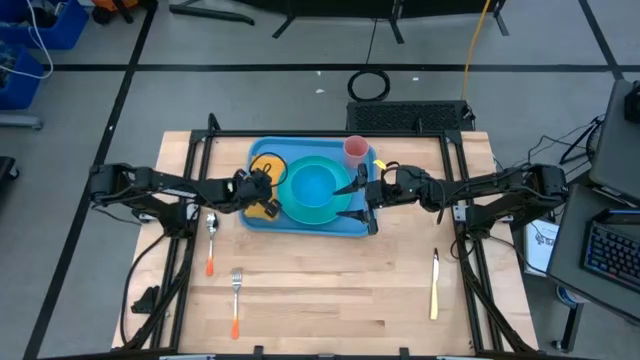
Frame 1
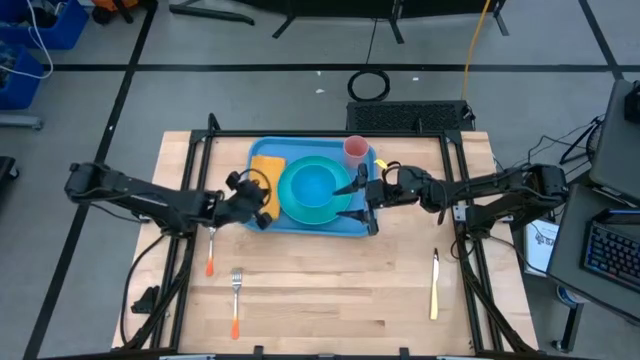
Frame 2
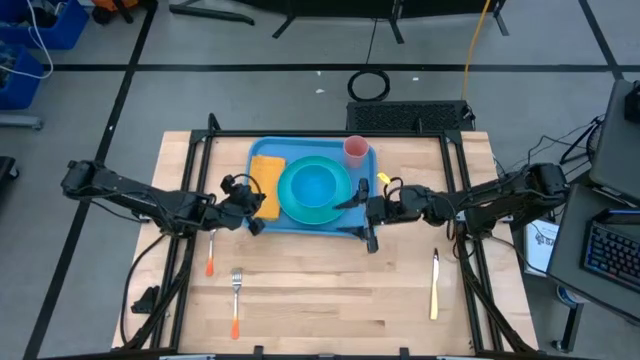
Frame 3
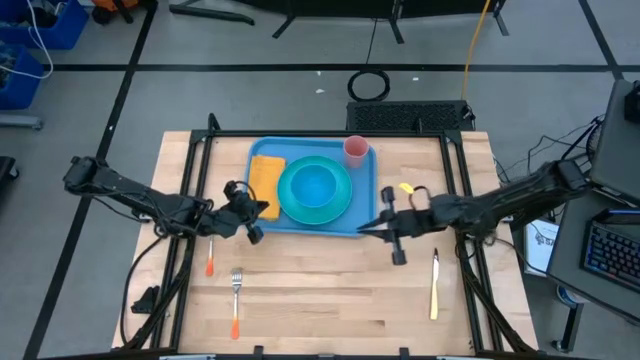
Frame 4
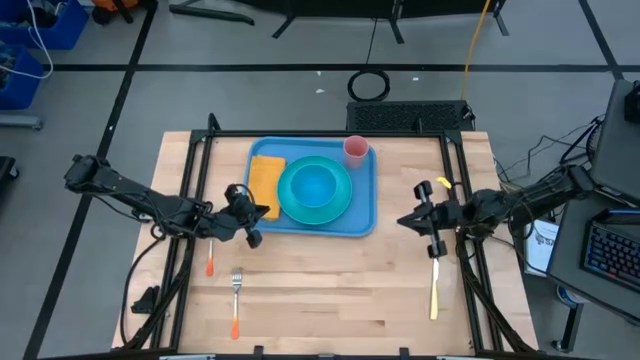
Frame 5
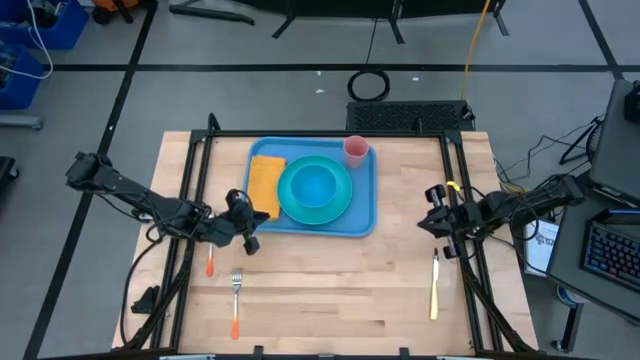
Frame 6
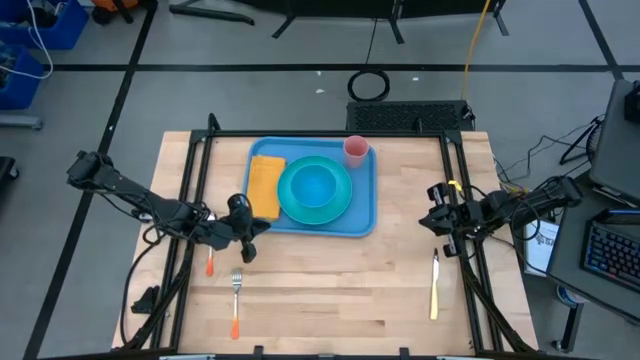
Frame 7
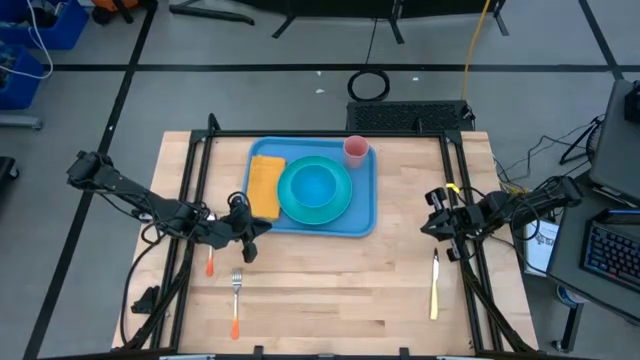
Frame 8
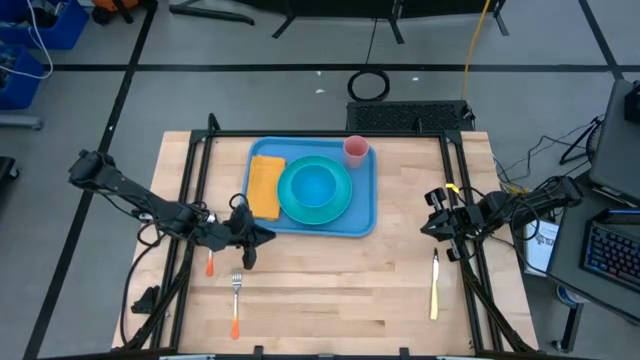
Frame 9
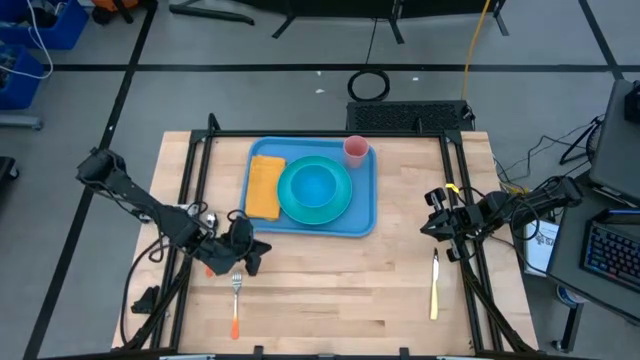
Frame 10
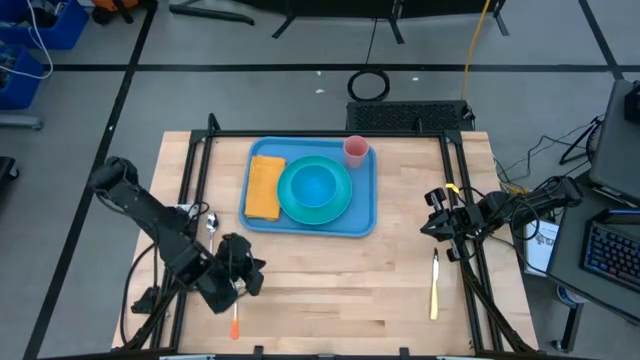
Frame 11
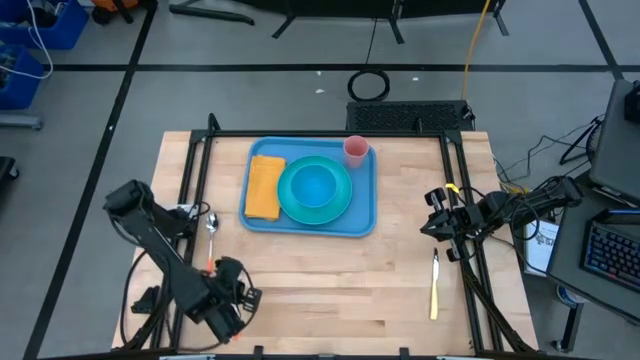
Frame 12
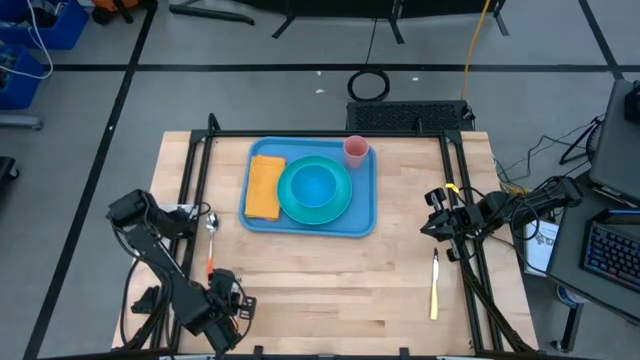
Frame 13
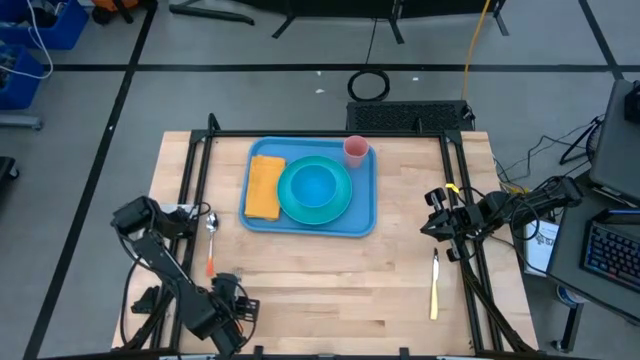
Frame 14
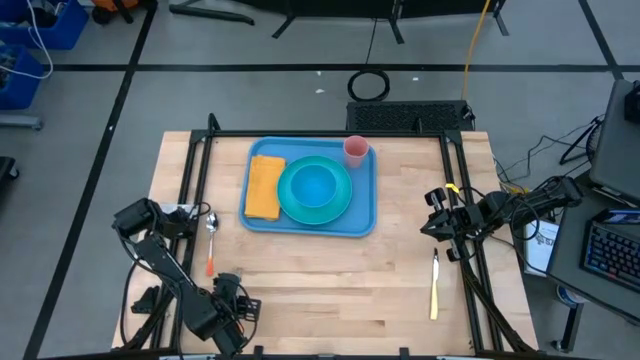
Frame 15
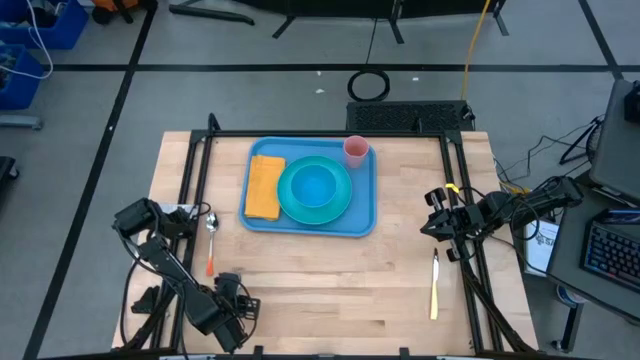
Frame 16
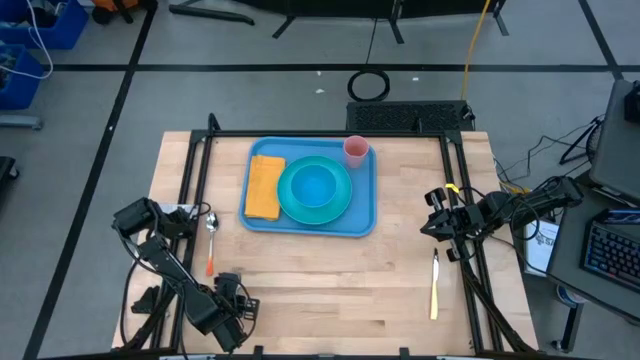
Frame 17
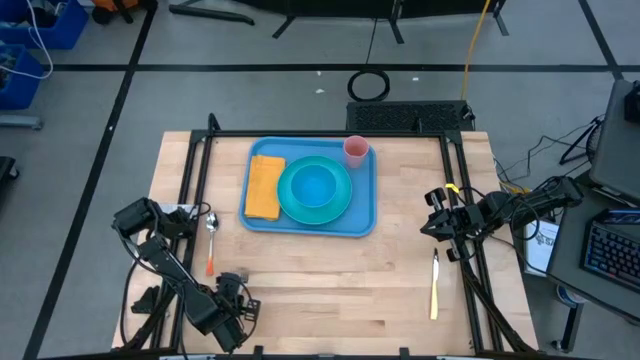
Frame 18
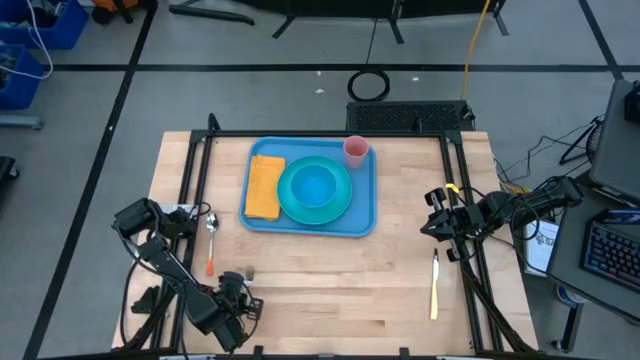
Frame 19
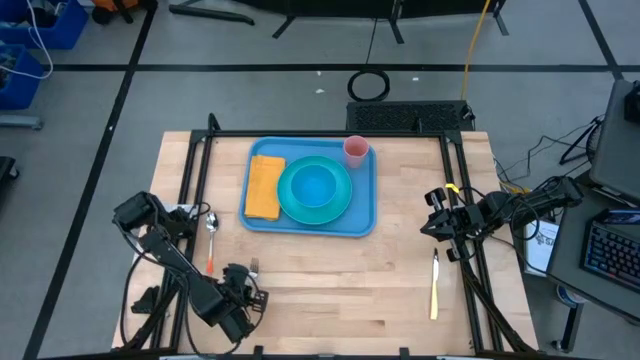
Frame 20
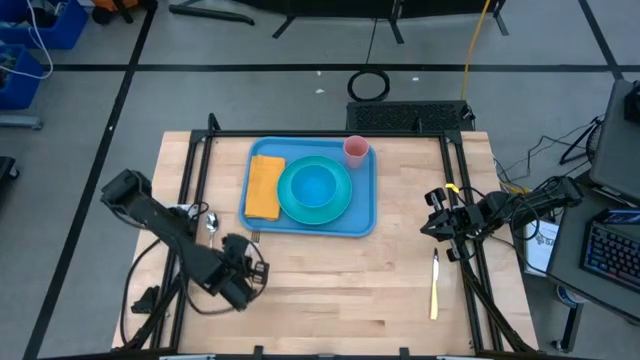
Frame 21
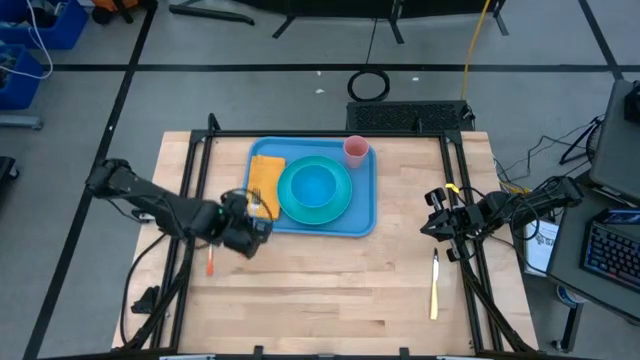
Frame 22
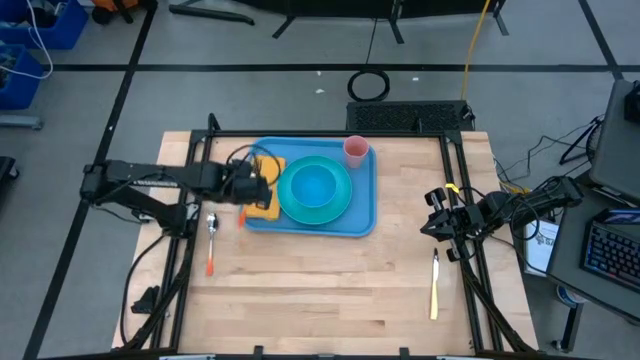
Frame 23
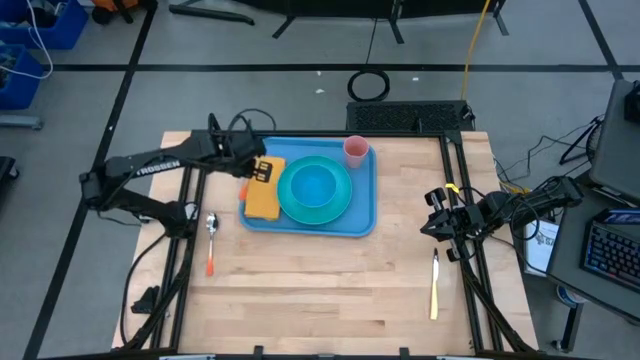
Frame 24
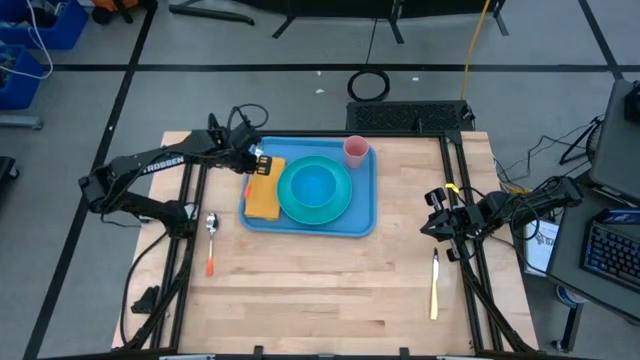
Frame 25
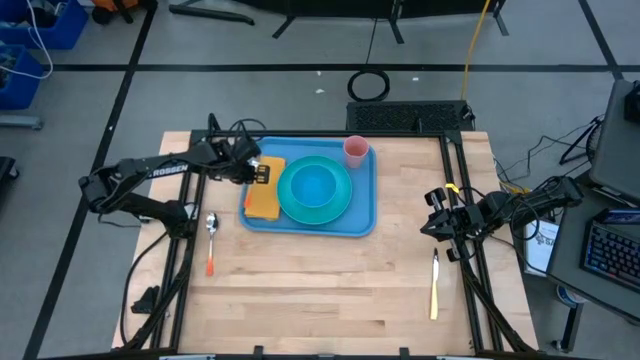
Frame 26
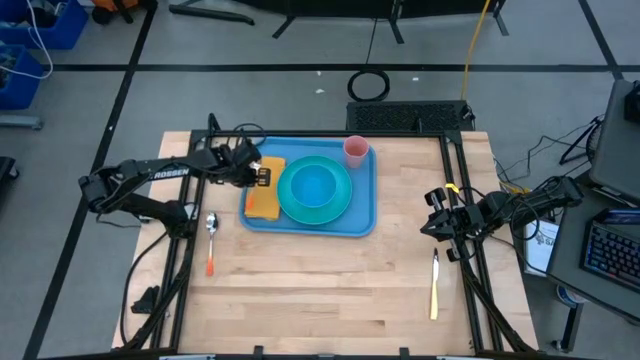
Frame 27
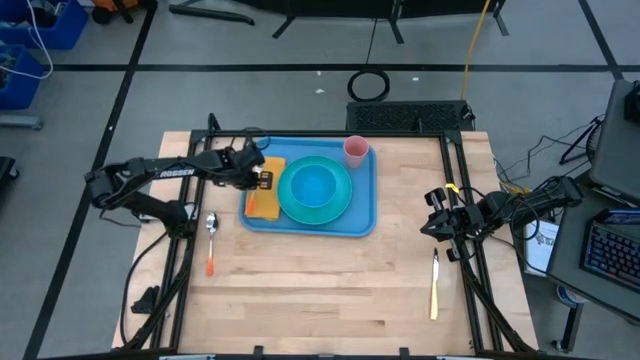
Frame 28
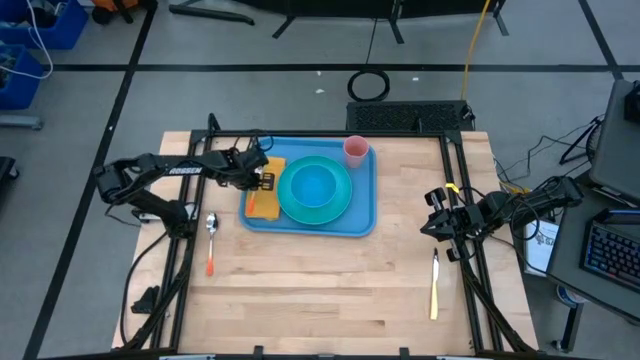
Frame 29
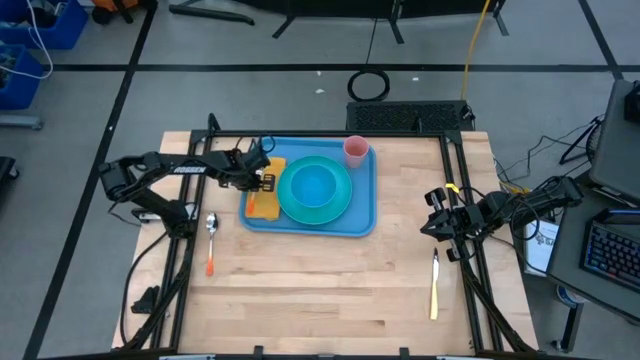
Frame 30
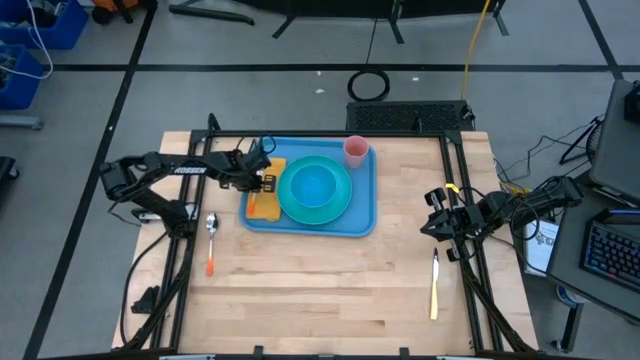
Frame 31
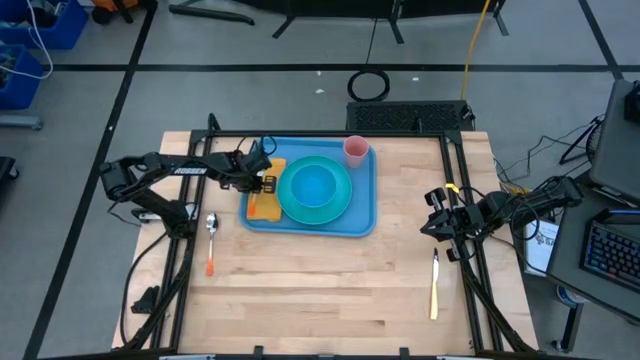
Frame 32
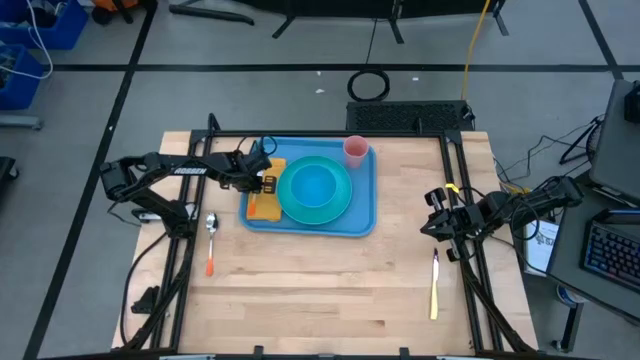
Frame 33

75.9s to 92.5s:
Task: Set up tray
Put the orange fork on the yellow napkin

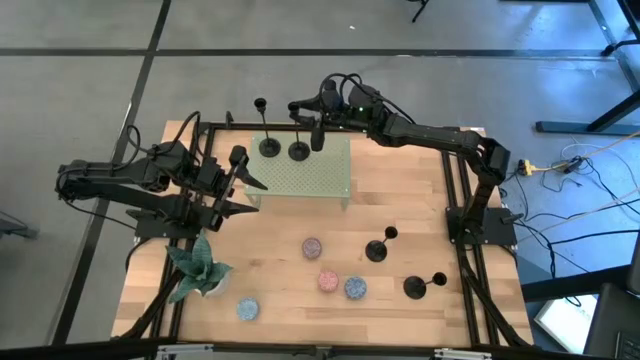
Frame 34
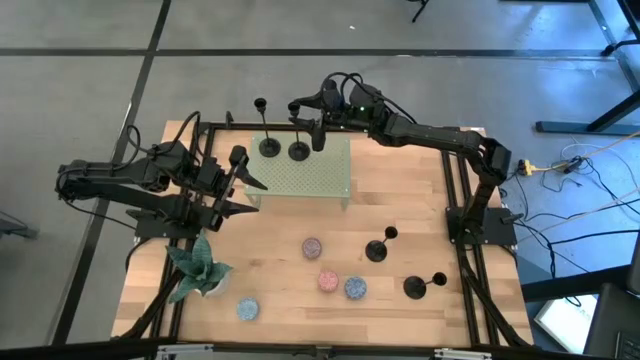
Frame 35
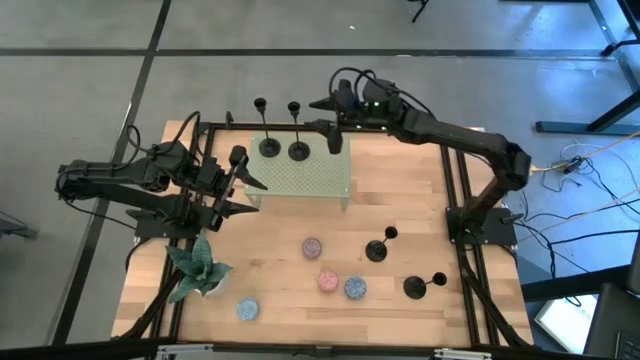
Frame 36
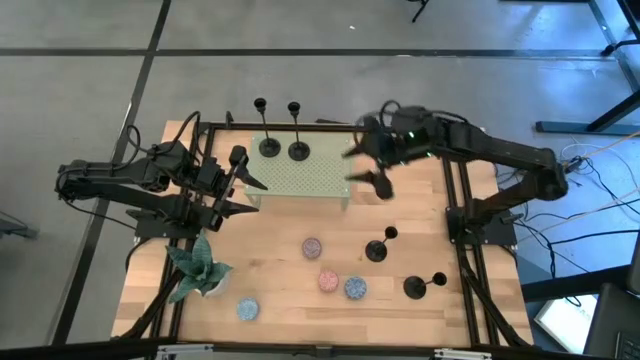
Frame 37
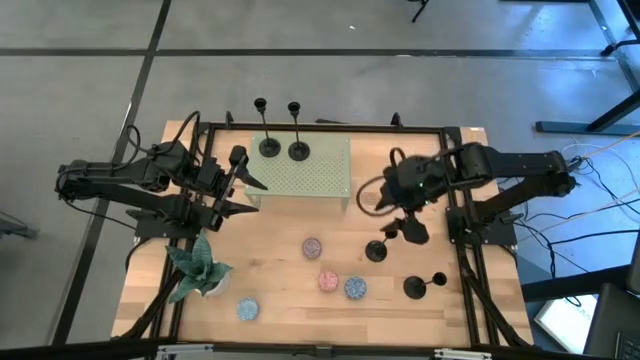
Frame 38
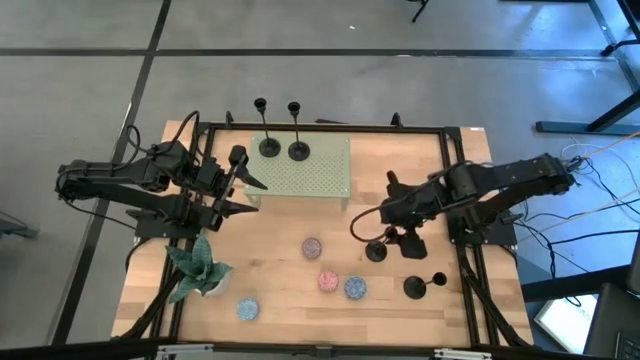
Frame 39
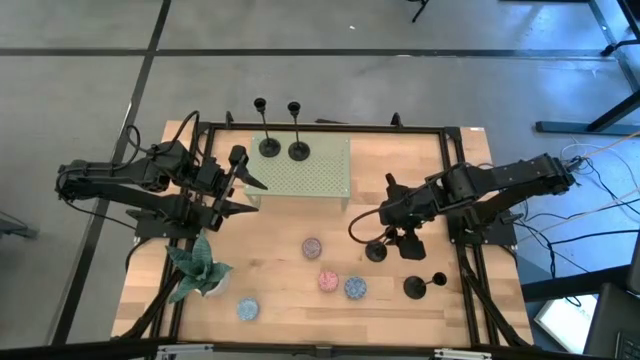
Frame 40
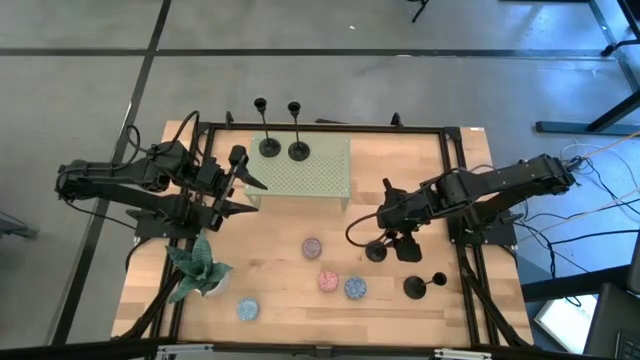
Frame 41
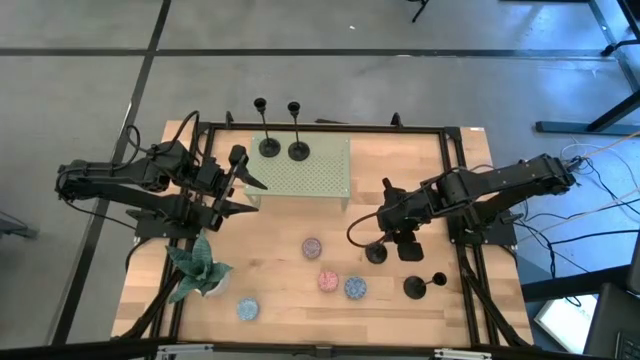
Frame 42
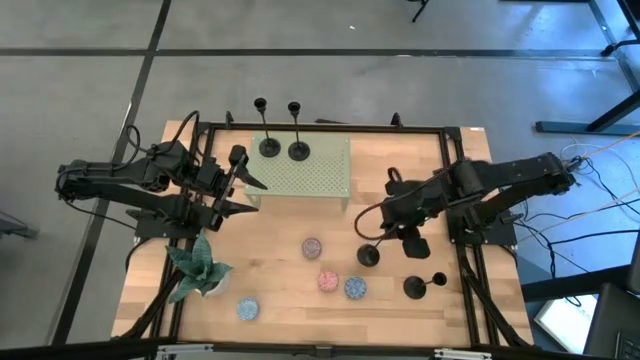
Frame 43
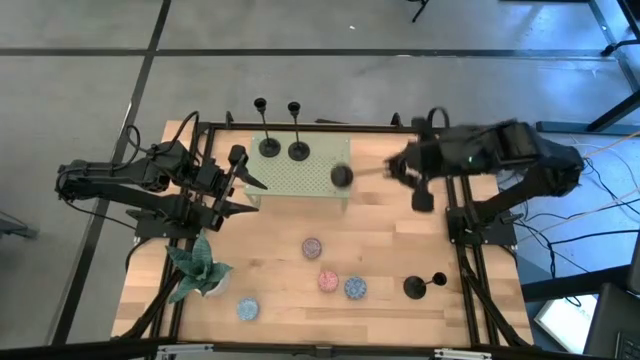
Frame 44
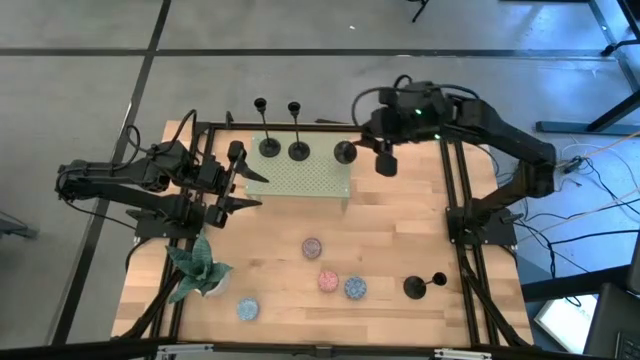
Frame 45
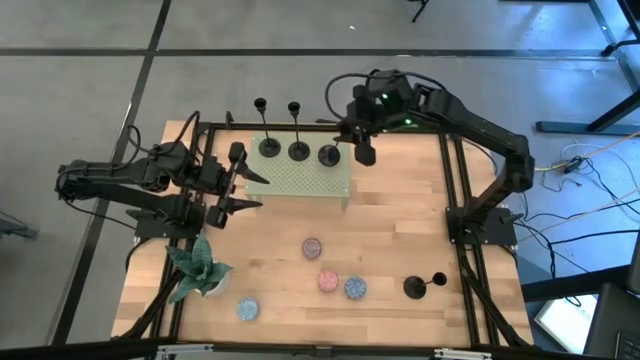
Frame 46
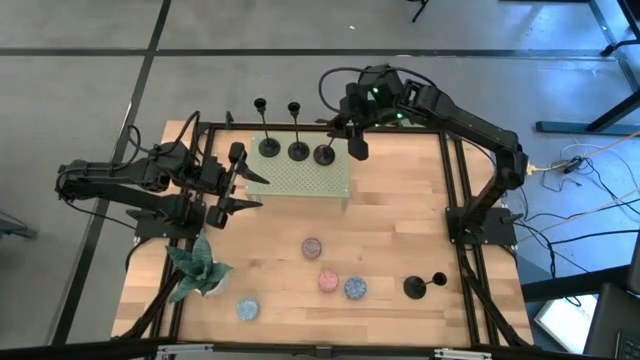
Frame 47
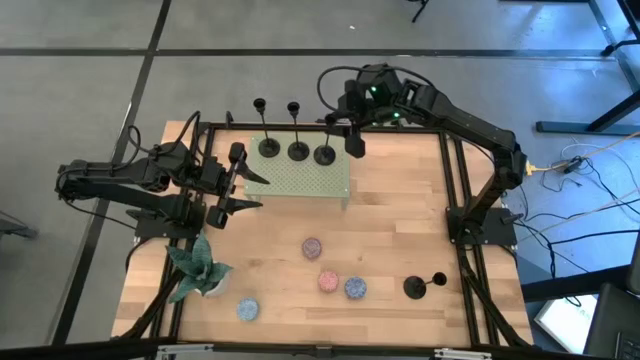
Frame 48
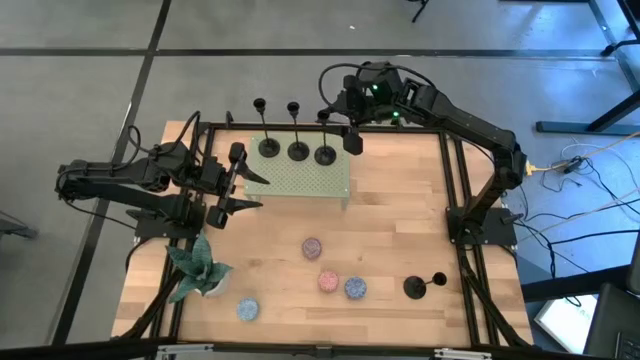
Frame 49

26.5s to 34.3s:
Task: Pick & Place candle stick holders
Align the black candle holder with the black candle holders on the shelf
